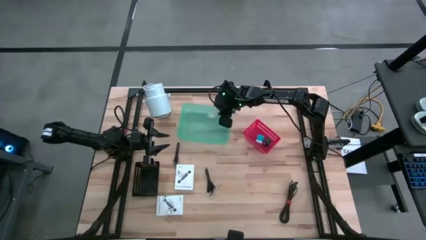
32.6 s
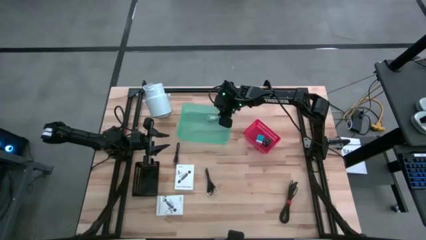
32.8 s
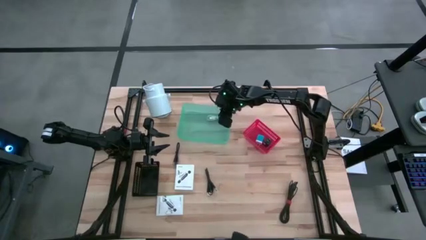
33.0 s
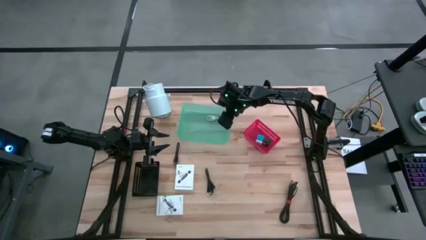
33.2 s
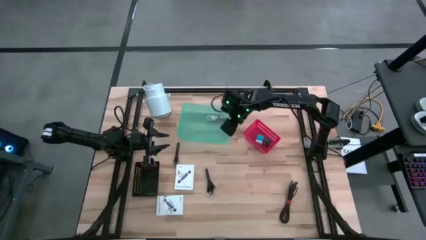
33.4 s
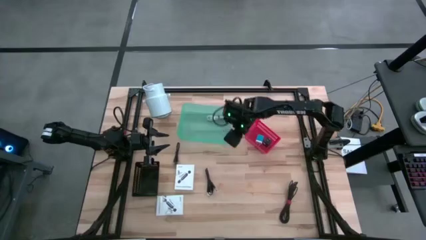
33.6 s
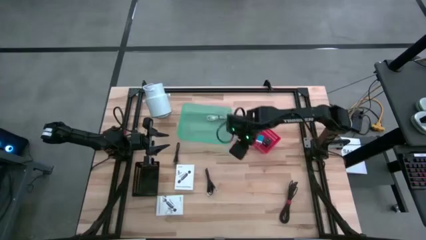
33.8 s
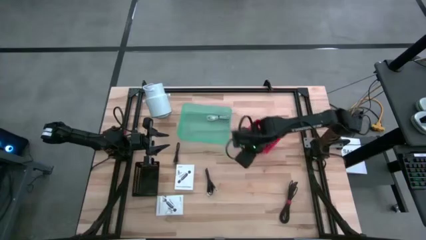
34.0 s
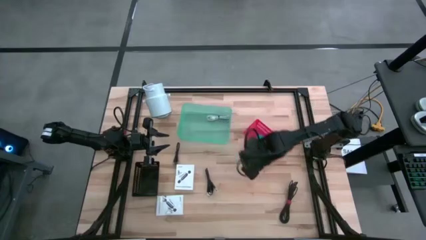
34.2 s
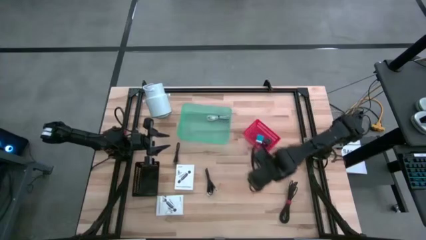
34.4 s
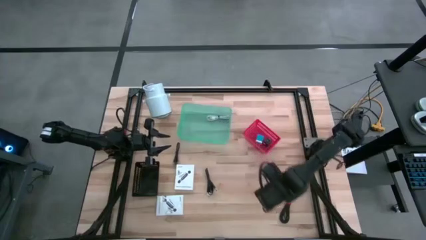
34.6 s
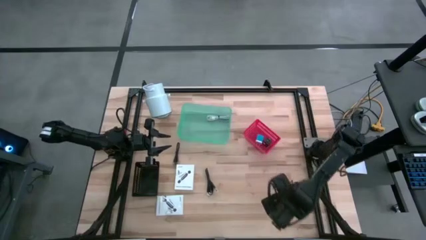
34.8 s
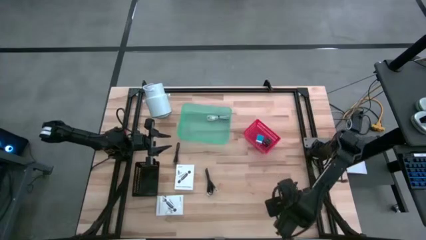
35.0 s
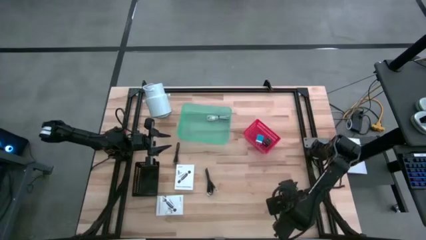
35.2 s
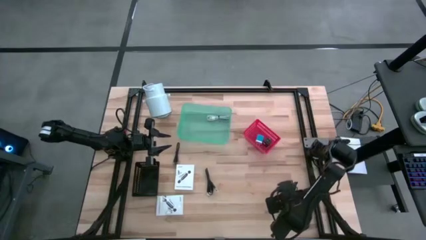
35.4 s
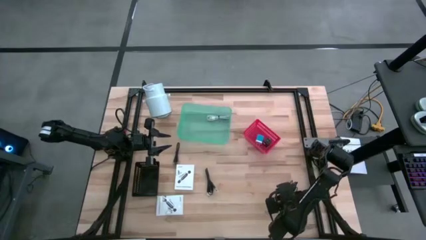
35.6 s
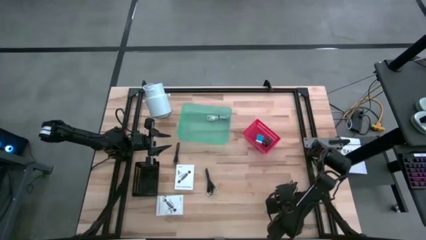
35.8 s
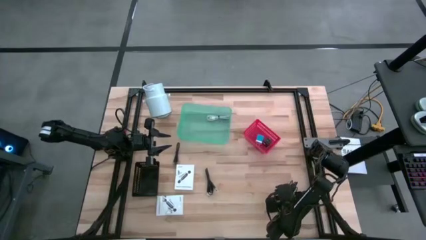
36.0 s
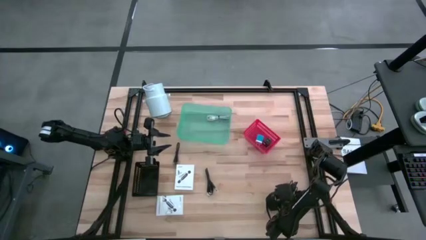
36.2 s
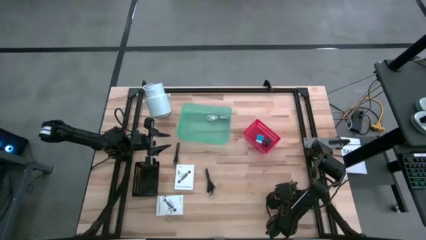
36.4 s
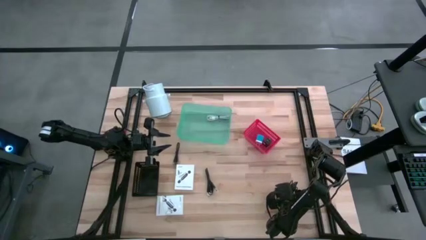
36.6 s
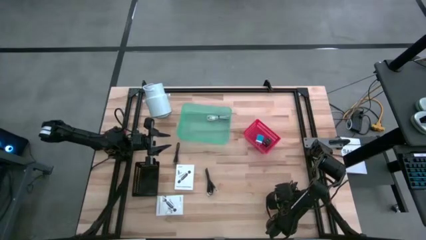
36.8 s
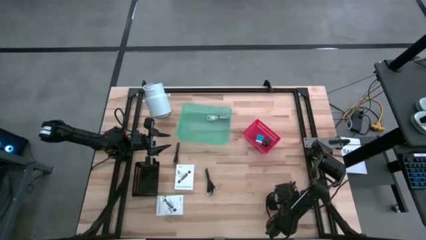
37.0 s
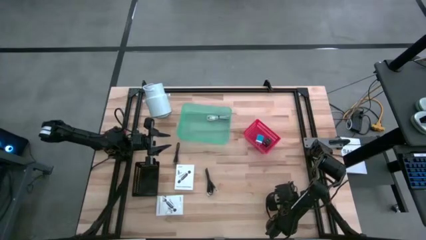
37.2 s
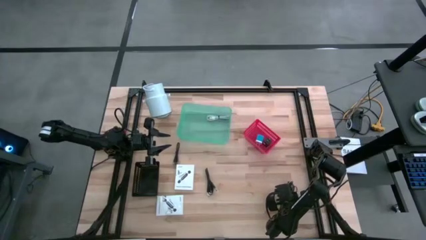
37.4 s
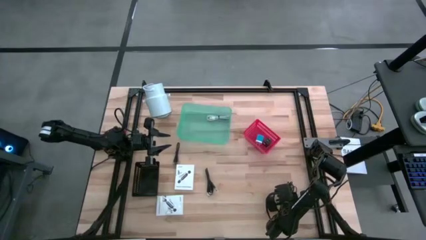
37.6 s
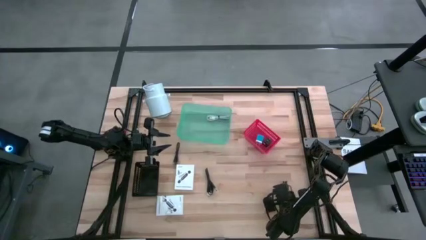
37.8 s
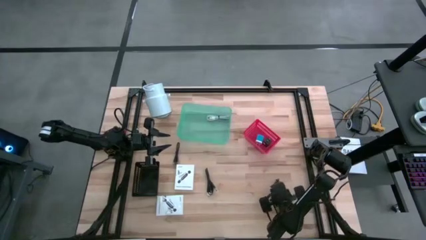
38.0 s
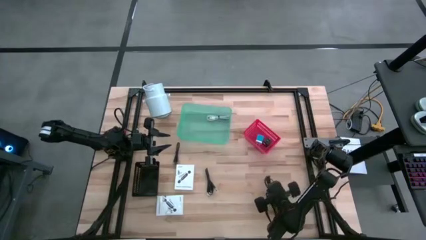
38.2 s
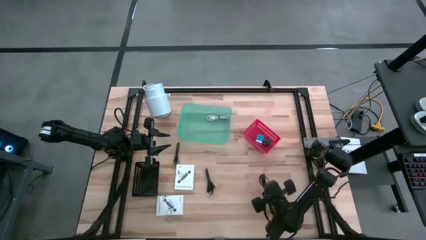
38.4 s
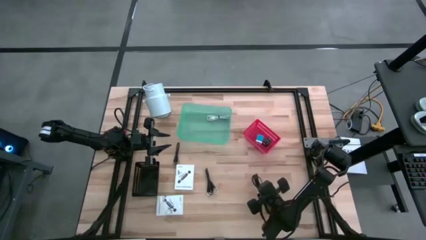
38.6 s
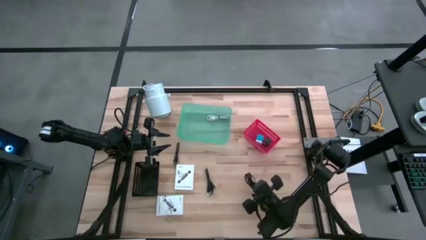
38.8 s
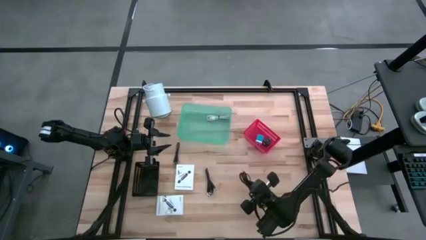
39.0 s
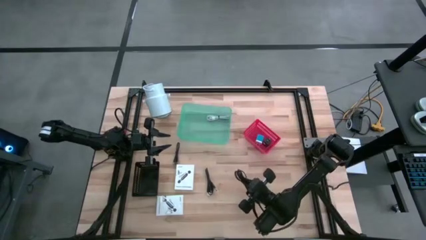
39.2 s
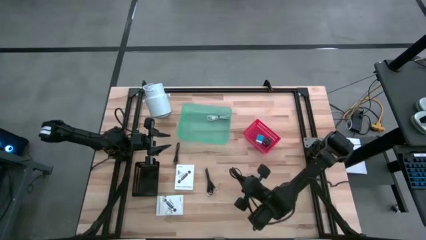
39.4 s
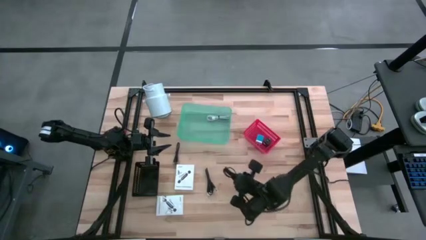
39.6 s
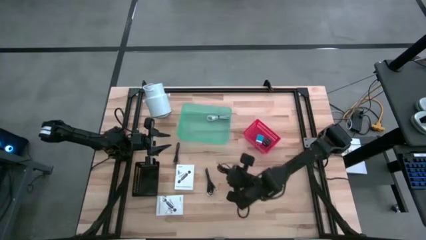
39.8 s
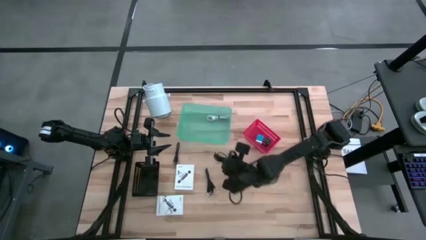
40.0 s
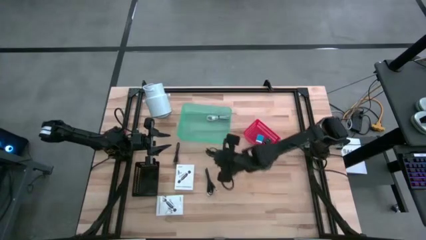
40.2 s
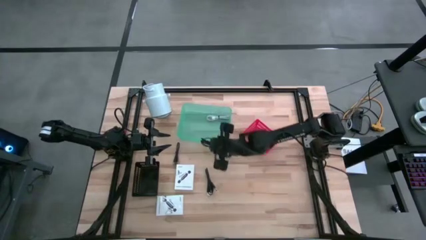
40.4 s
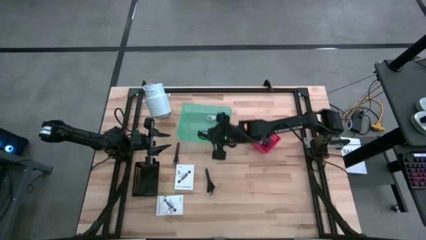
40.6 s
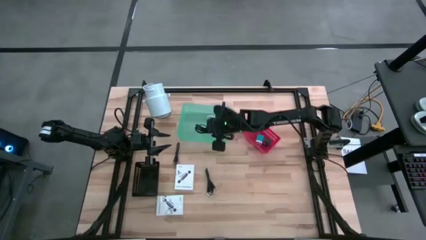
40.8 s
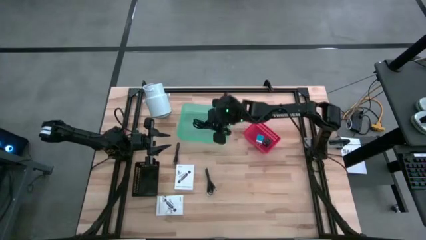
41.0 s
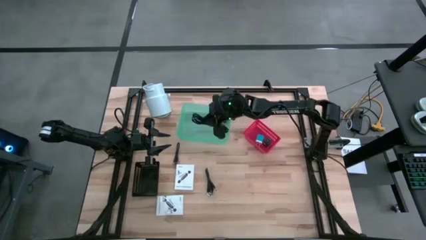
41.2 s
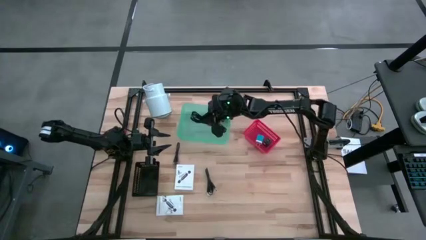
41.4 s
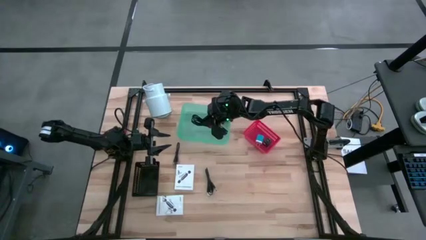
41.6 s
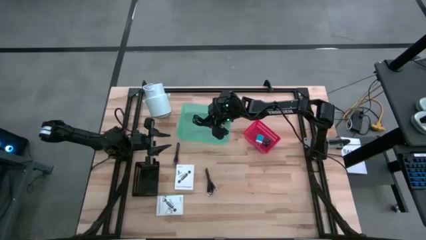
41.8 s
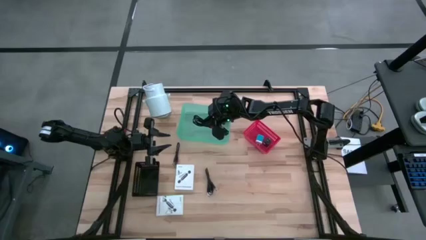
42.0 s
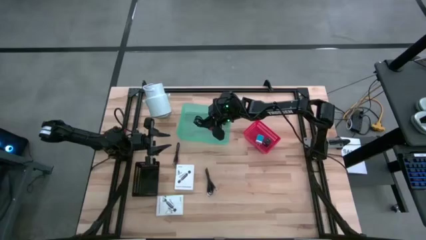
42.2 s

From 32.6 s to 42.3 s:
Task: Pick and place items into bin
Put the right black charger cable into the transparent green bin

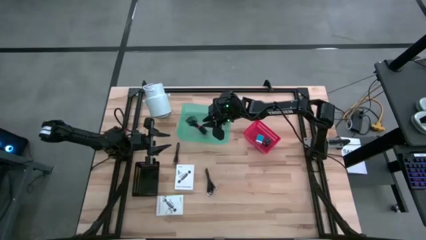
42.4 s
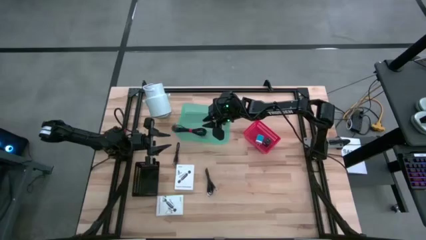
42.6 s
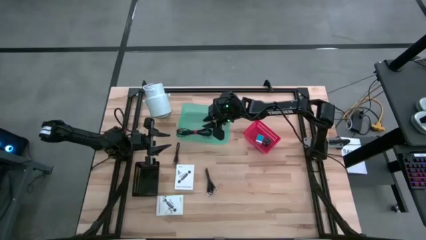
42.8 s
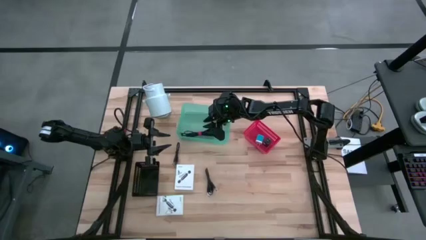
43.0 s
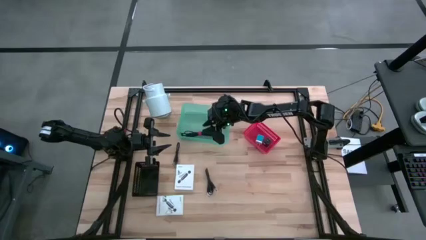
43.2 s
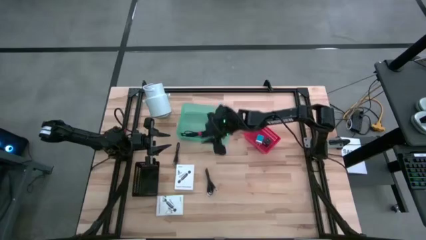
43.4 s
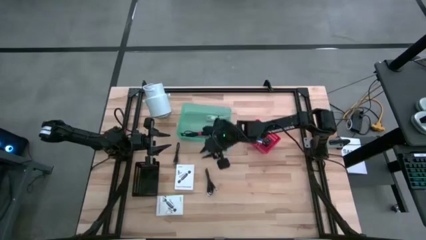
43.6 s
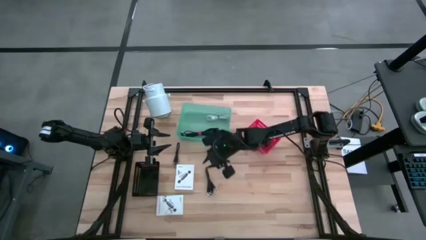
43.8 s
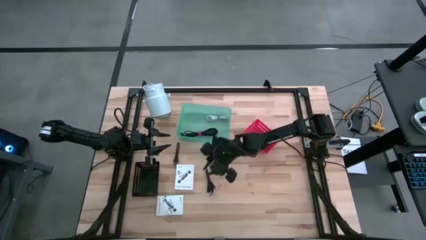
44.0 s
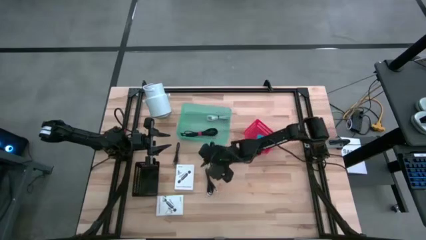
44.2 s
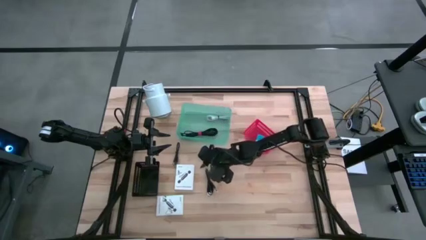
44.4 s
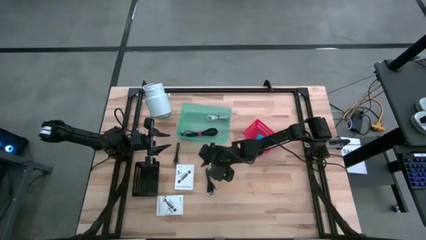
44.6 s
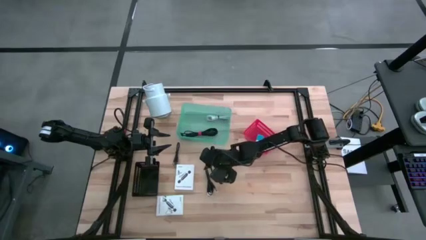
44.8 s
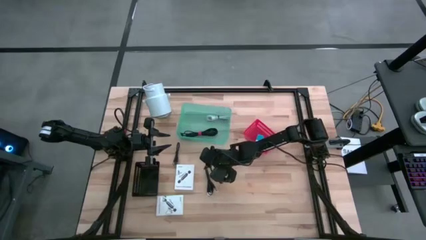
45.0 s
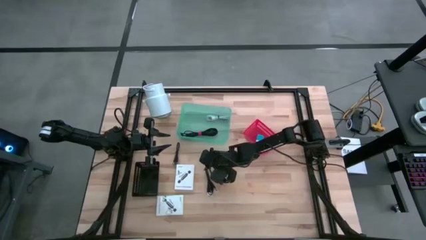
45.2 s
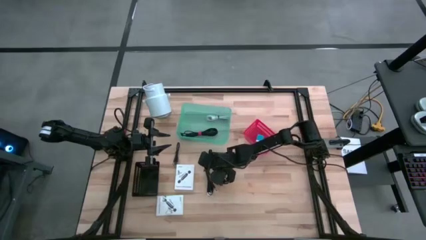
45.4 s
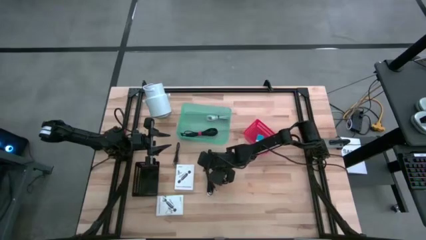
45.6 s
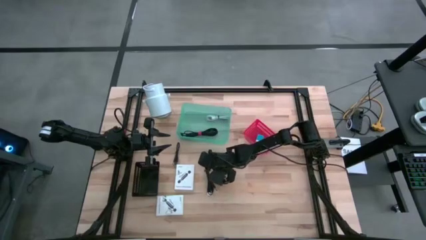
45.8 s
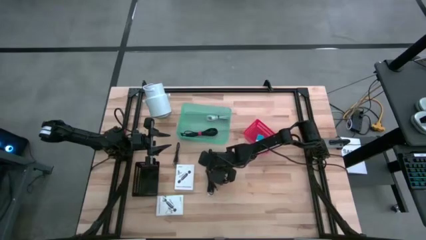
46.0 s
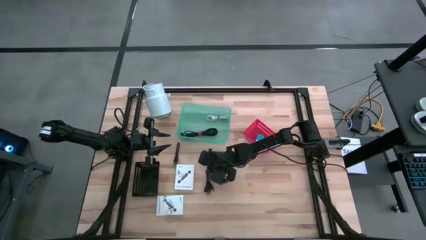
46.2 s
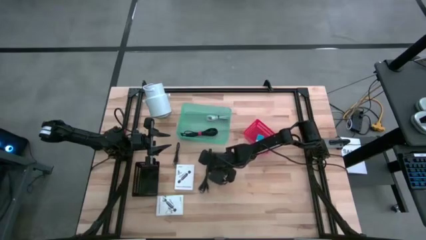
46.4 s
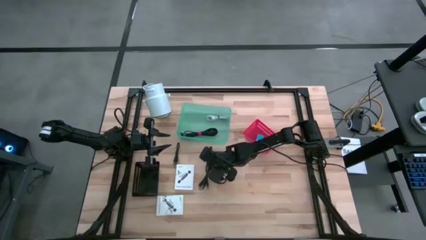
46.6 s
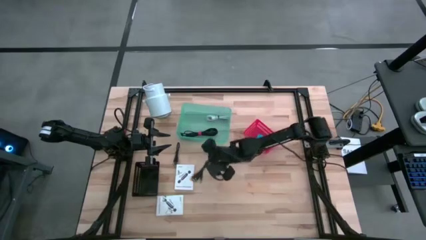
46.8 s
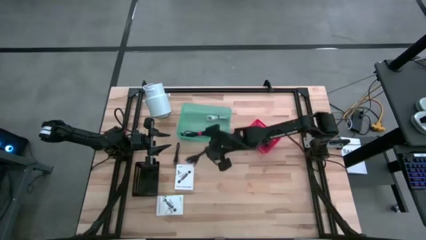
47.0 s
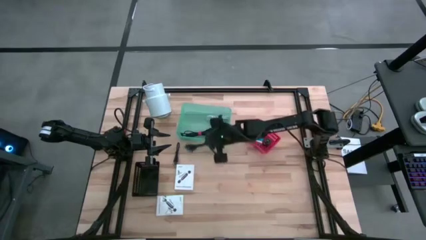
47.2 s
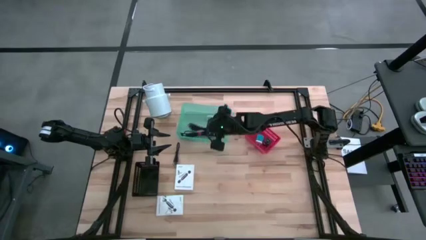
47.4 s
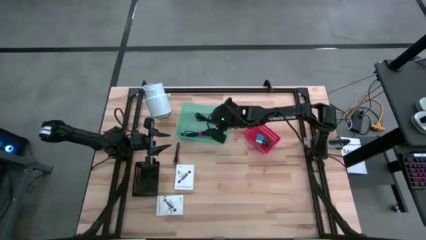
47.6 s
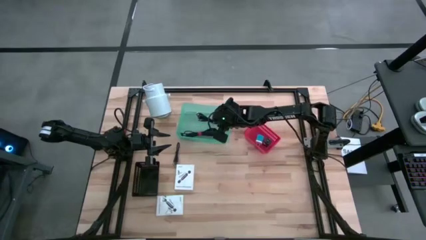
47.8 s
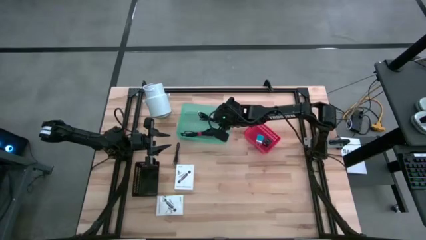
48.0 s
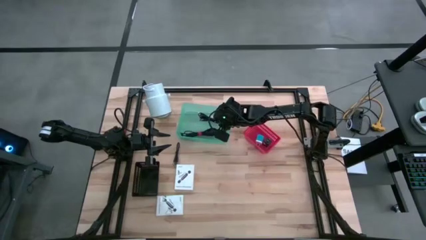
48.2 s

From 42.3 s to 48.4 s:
Put the right black charger cable into the transparent green bin
